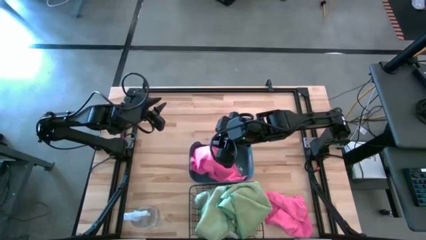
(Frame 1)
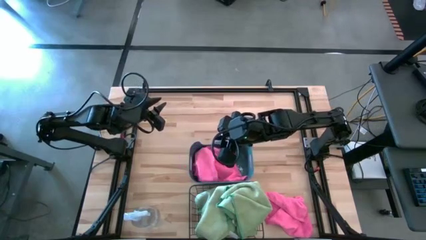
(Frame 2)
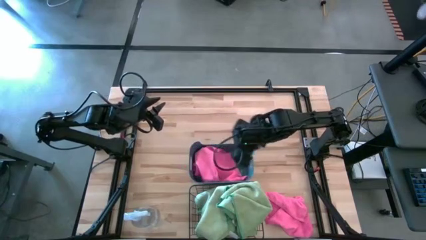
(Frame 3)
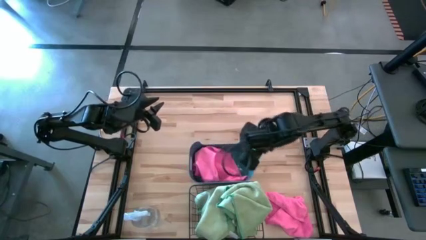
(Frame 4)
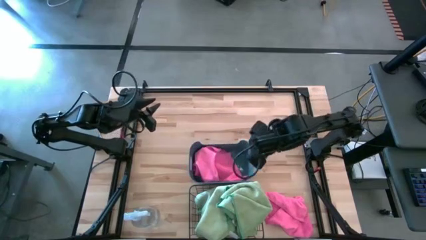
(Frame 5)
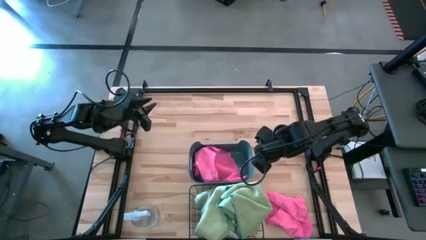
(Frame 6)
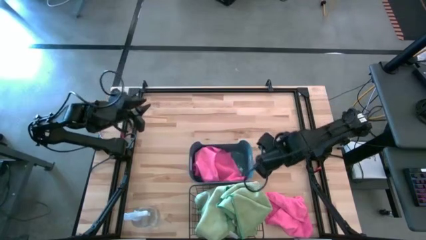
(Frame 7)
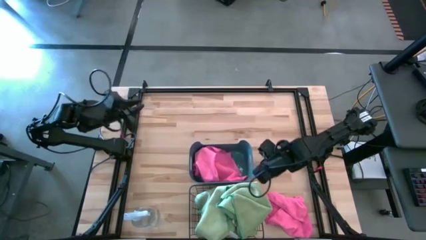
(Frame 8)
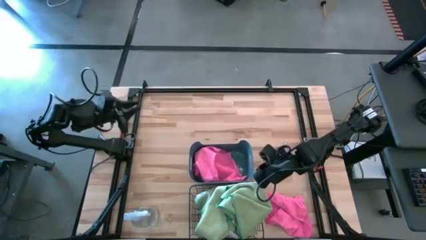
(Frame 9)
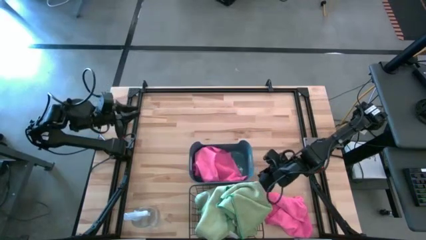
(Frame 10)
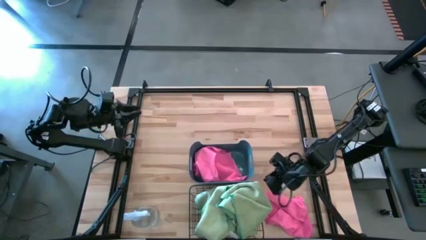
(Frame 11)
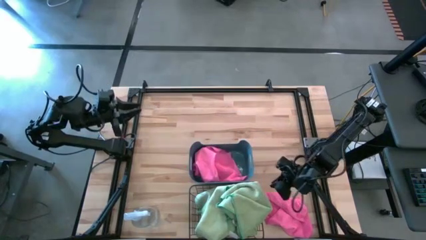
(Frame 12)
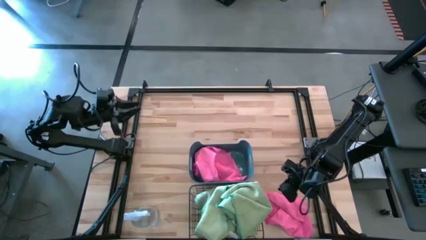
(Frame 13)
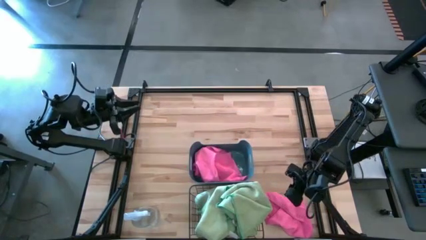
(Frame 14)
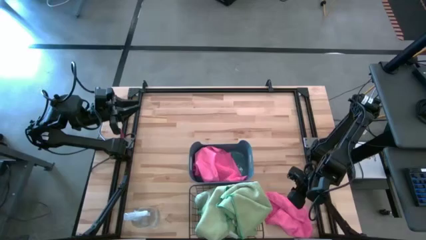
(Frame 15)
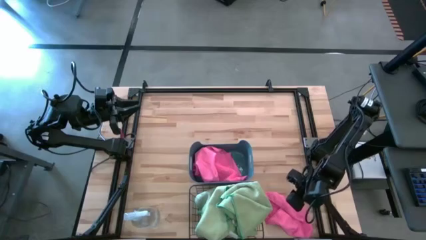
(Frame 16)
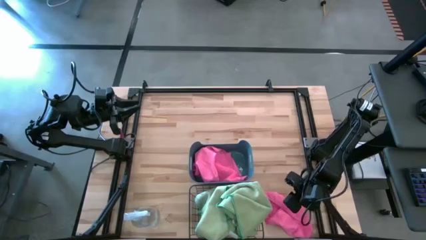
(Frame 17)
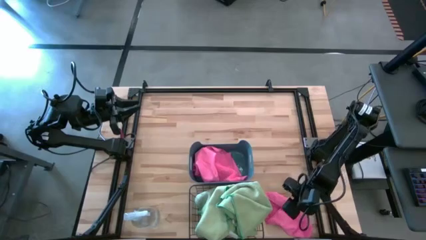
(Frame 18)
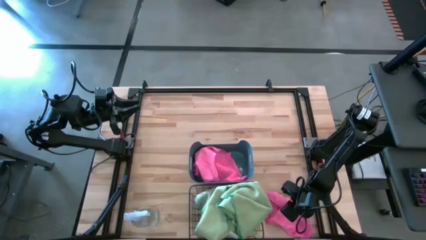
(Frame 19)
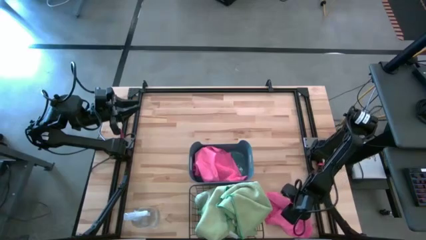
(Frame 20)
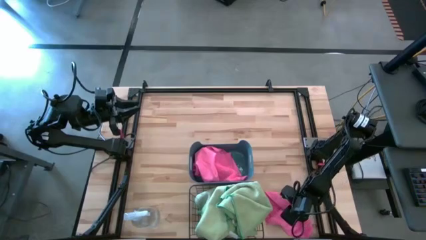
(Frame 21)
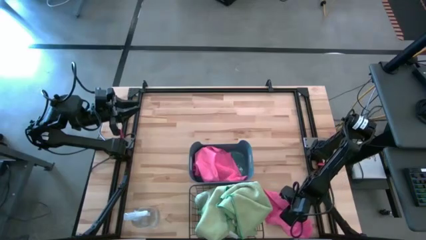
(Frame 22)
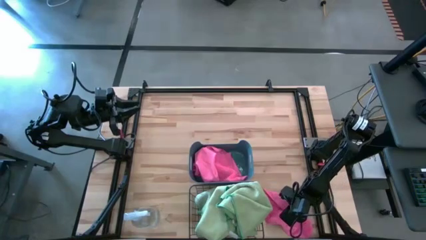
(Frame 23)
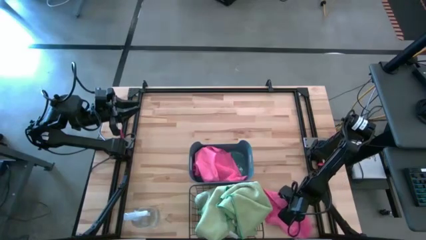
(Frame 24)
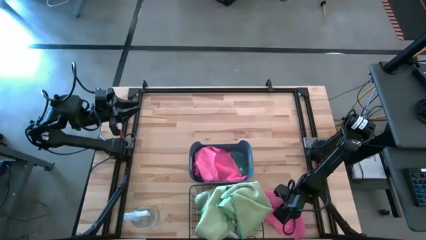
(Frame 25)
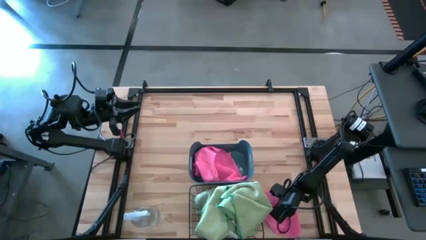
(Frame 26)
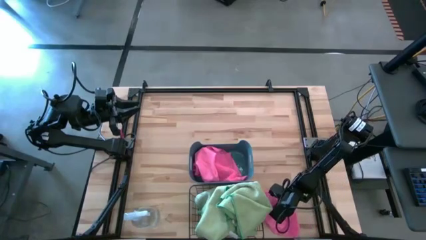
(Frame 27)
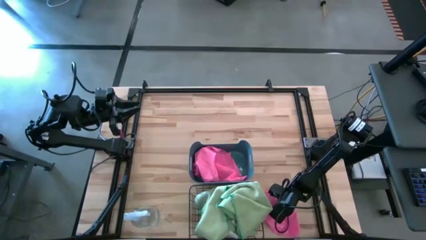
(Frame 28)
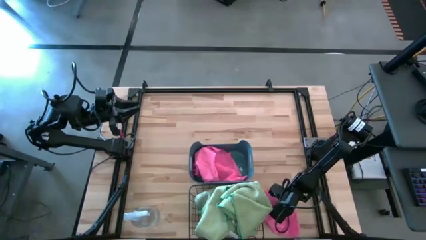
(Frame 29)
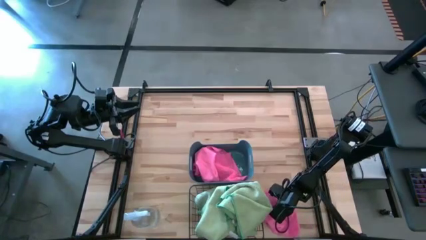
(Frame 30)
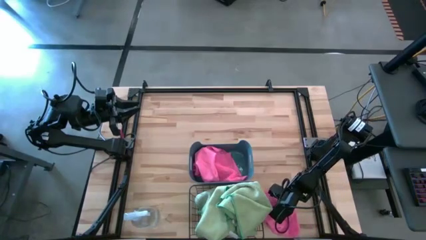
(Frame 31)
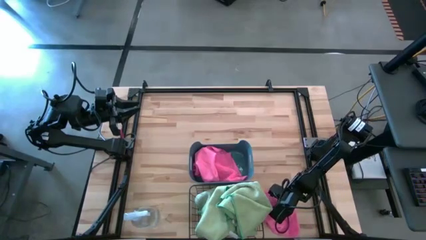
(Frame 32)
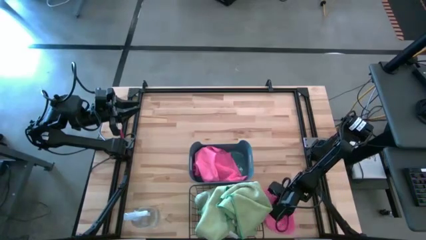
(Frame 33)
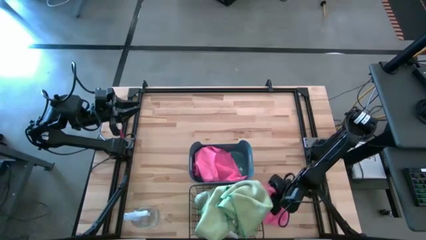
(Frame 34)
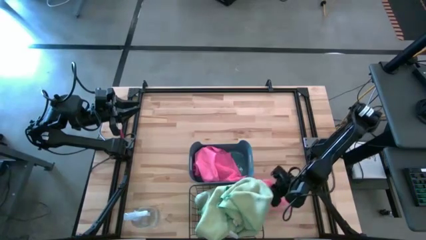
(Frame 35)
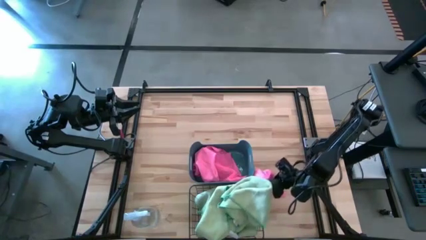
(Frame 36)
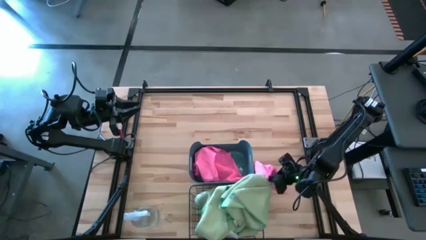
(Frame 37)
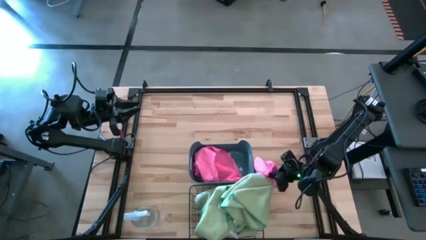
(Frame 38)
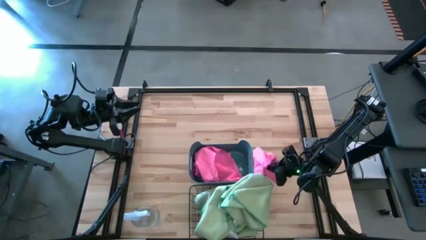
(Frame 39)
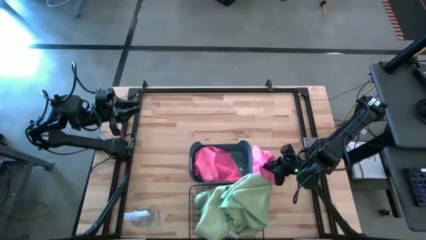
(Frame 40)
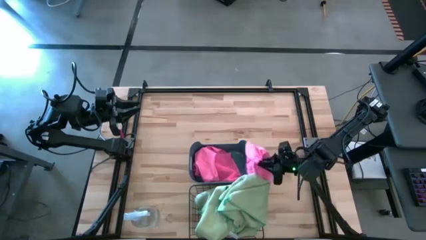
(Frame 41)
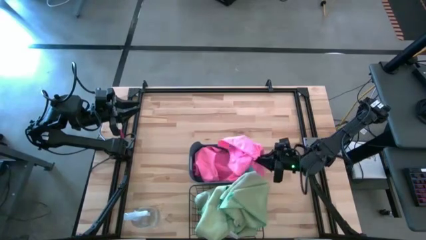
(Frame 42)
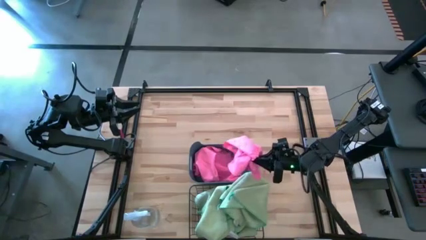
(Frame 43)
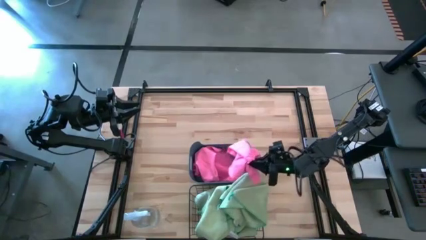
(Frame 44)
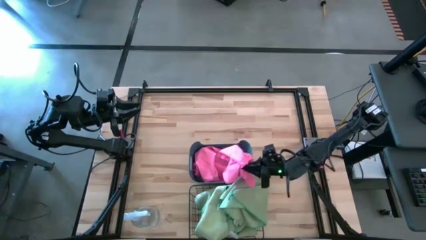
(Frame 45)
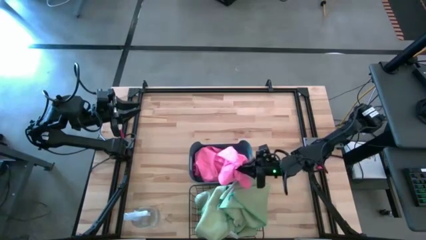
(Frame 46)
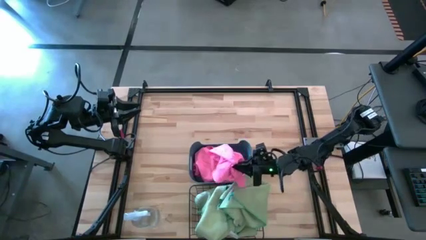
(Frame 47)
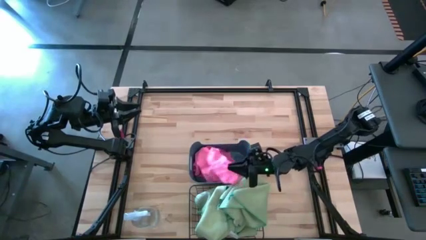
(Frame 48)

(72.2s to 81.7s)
Task: Sort microfiber towel by color & place in baskets
Put the pink microfiber towel into the blue bin

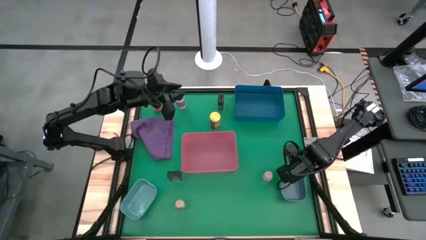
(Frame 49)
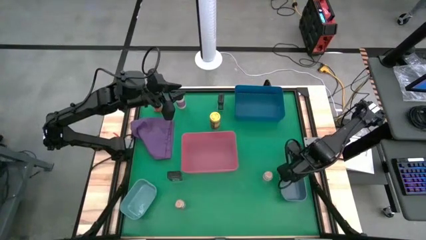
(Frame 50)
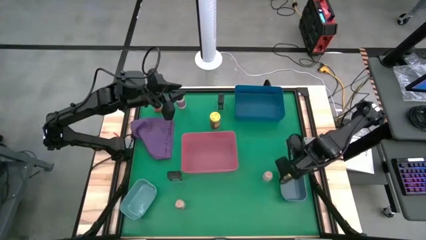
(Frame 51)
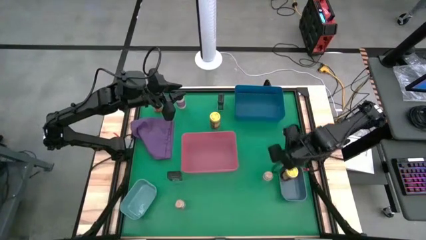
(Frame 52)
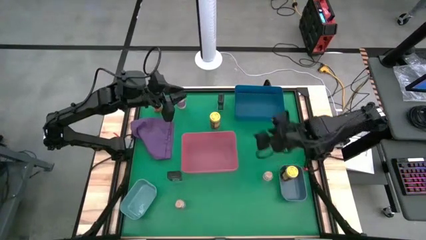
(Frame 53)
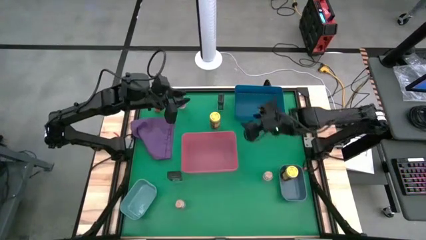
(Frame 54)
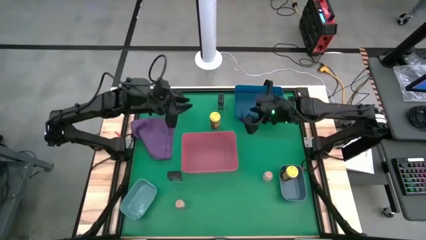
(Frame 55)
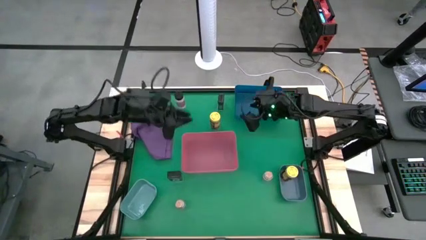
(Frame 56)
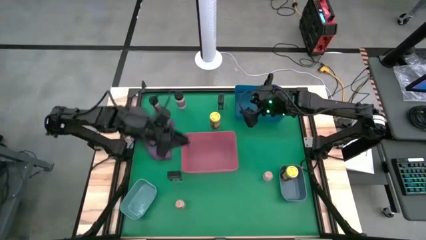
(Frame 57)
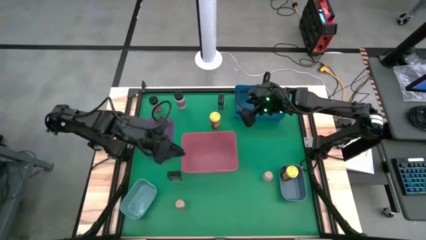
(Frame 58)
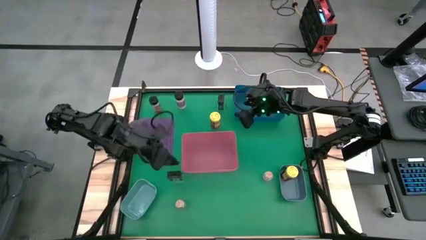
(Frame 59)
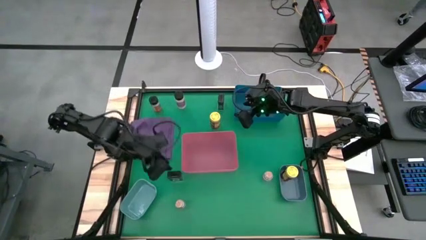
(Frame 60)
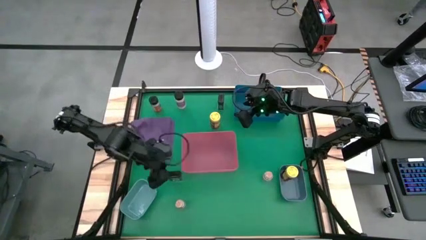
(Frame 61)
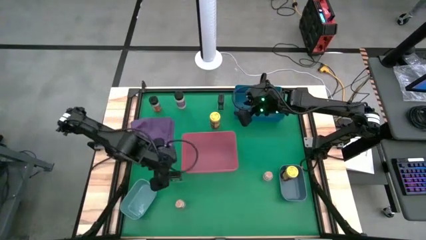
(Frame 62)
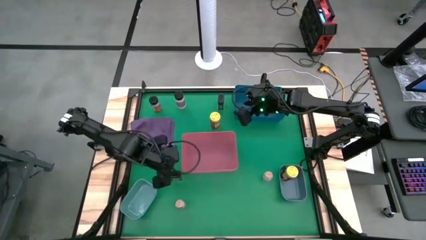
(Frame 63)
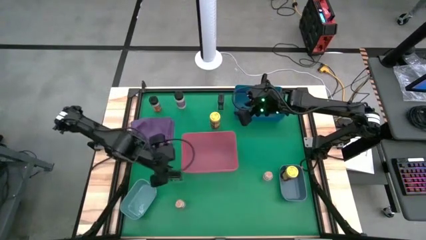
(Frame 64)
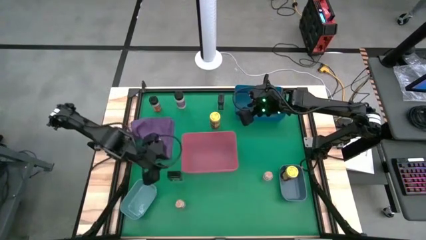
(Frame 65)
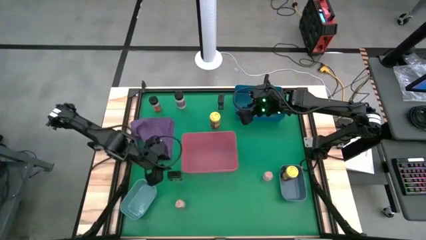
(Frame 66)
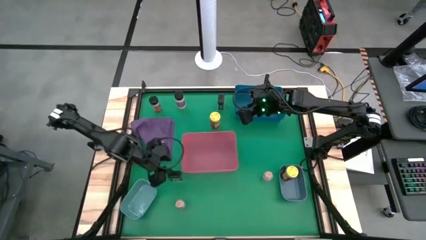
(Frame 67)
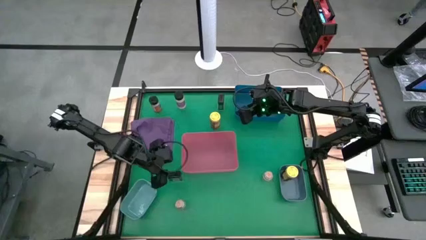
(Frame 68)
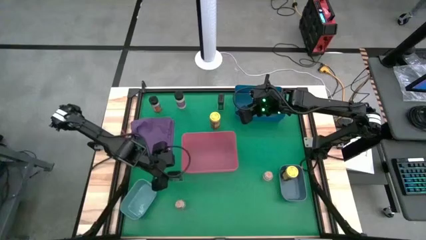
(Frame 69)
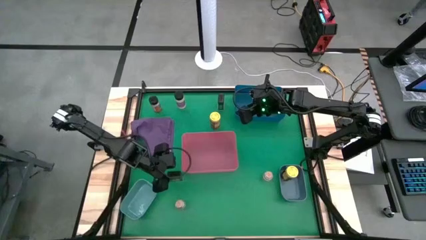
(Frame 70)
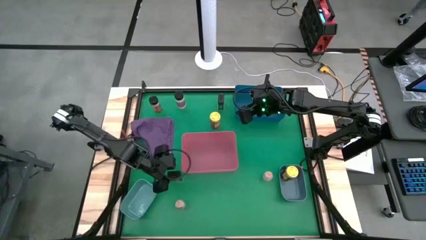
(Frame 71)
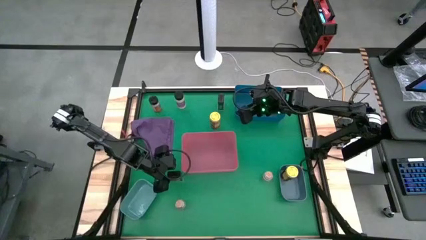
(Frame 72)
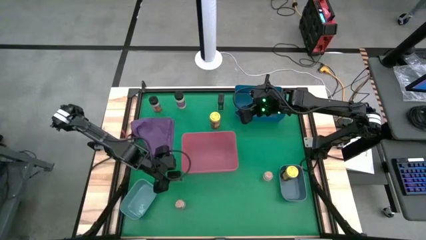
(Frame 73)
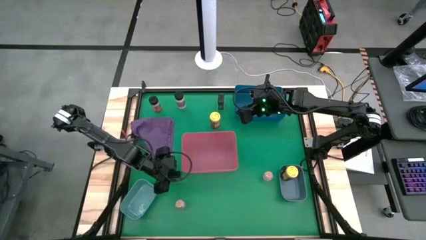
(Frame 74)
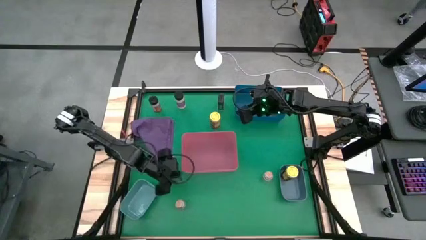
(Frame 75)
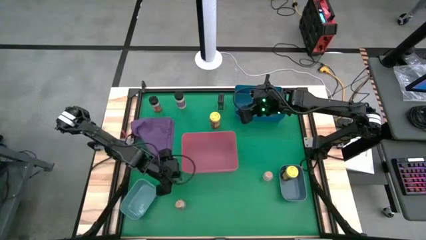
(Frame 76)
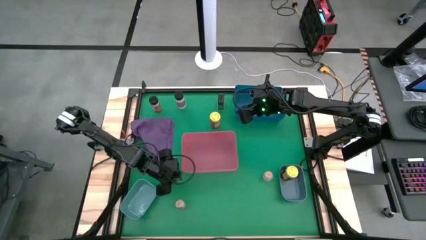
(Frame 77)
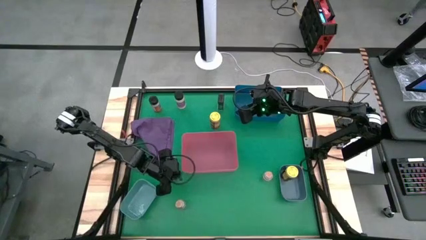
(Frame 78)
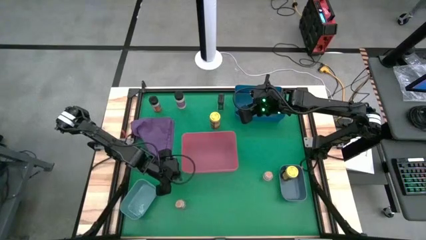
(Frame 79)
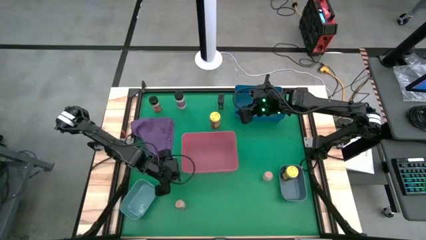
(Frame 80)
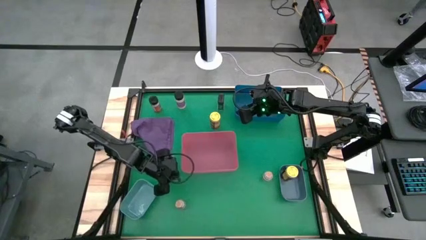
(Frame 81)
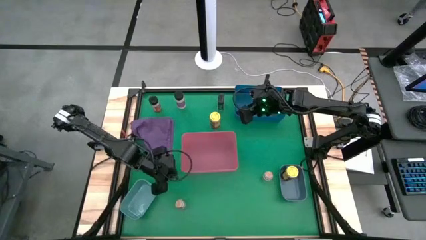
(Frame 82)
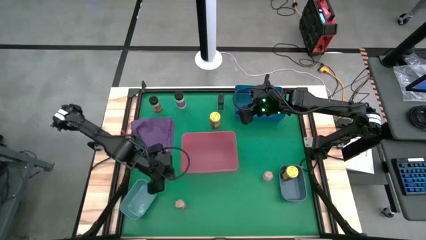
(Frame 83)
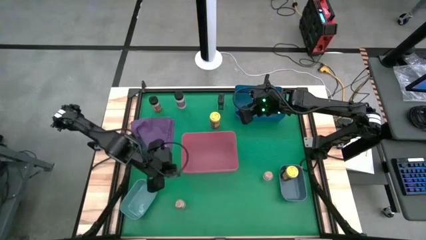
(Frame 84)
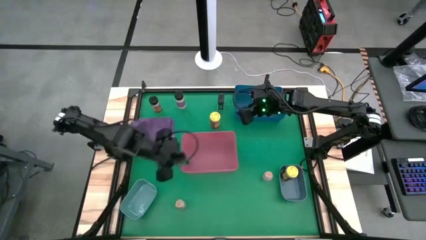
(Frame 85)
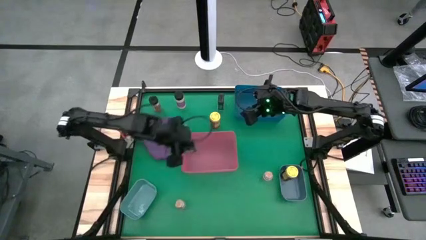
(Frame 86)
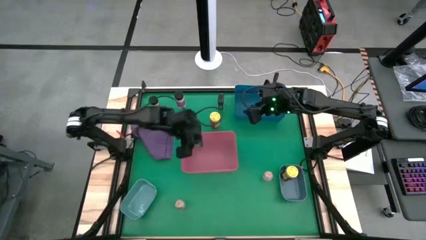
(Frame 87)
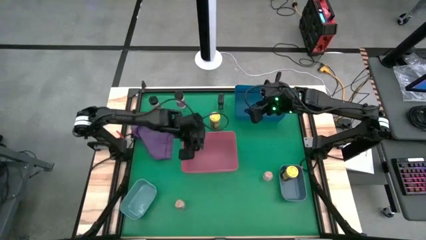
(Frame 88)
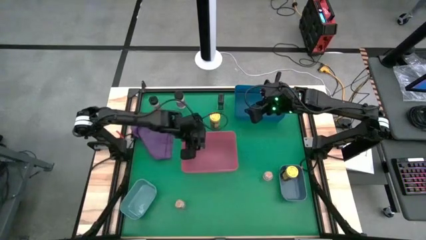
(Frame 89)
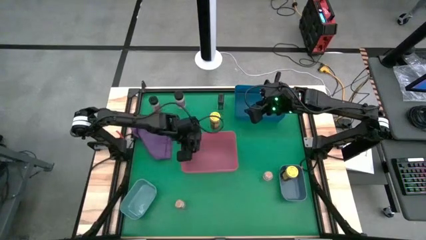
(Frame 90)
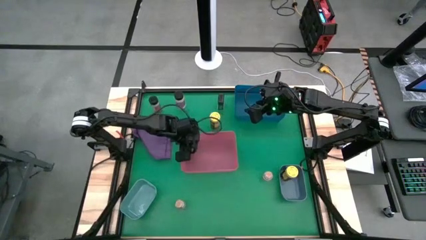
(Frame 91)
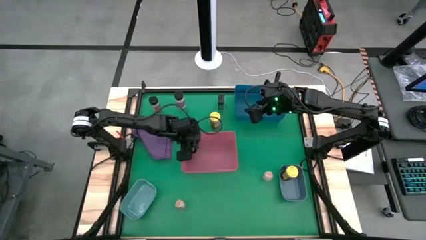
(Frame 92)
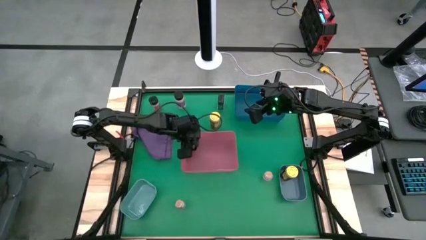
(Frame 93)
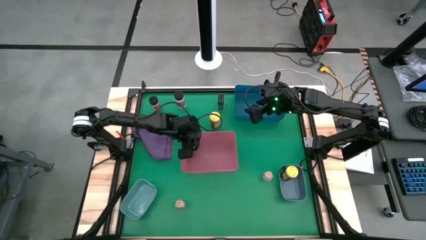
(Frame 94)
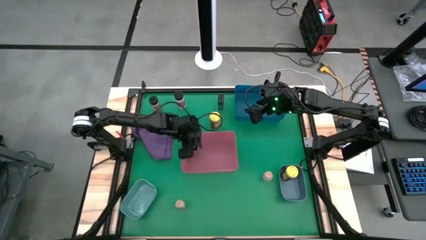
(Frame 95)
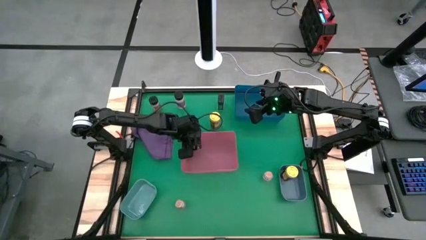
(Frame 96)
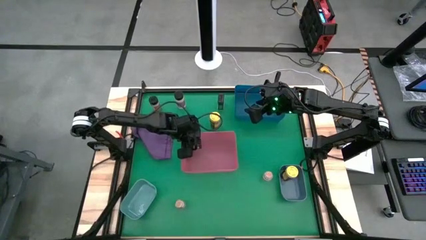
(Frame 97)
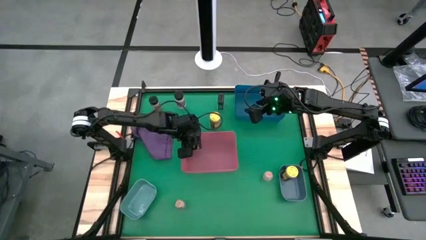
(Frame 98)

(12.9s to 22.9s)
Task: Sort spices by type
Put the bottom black seasoning can into the pink bin
